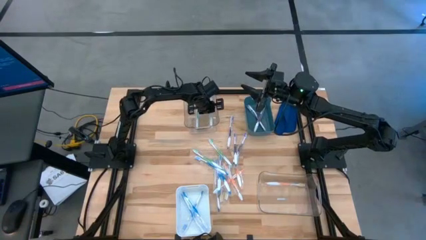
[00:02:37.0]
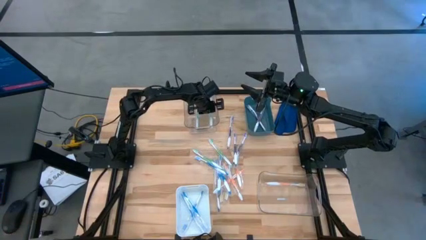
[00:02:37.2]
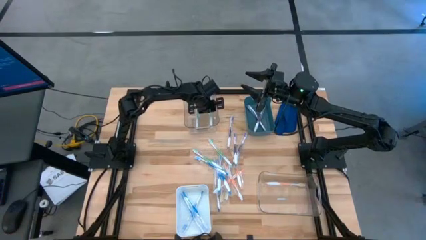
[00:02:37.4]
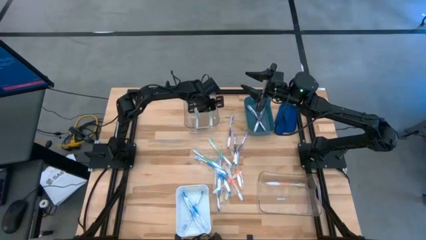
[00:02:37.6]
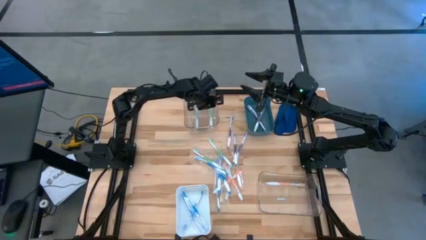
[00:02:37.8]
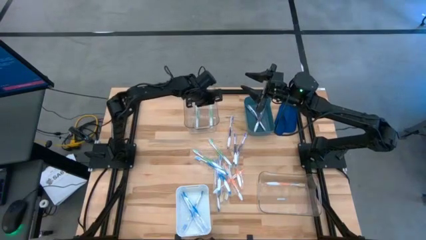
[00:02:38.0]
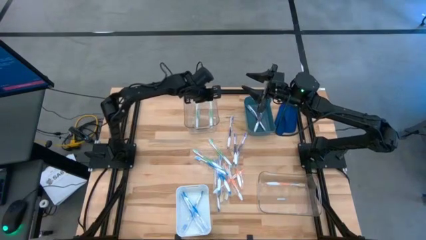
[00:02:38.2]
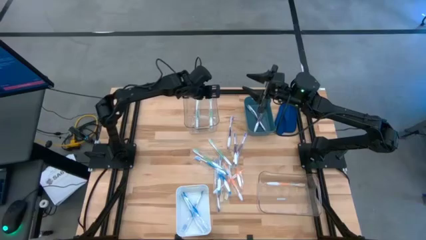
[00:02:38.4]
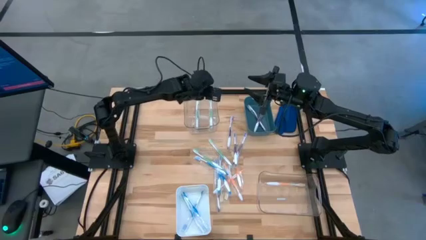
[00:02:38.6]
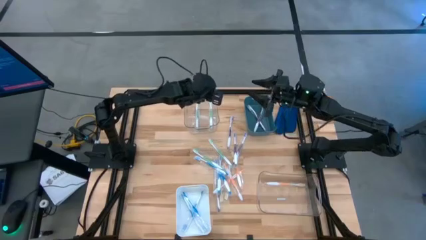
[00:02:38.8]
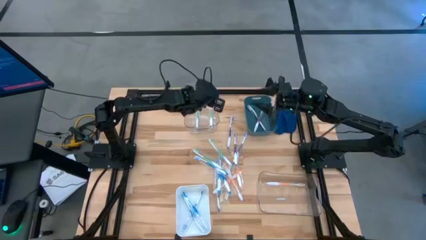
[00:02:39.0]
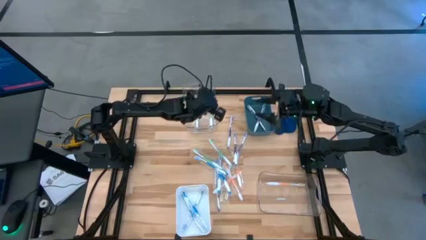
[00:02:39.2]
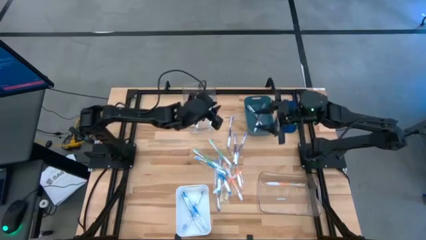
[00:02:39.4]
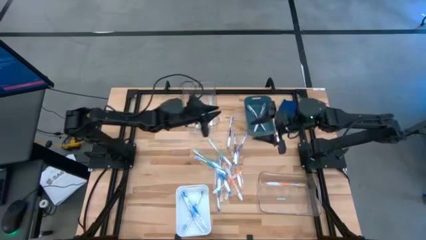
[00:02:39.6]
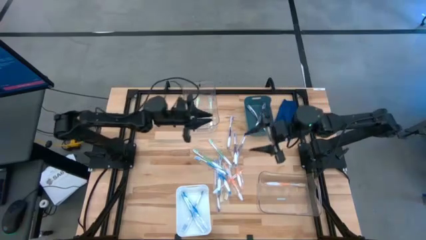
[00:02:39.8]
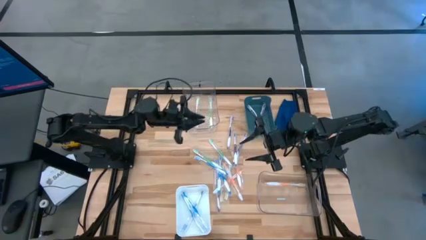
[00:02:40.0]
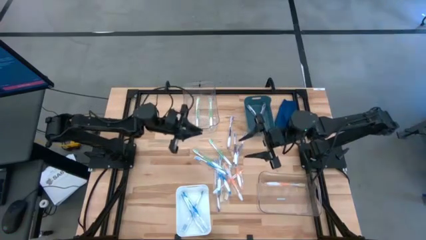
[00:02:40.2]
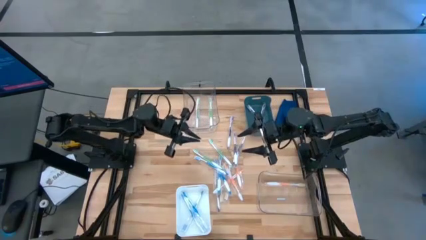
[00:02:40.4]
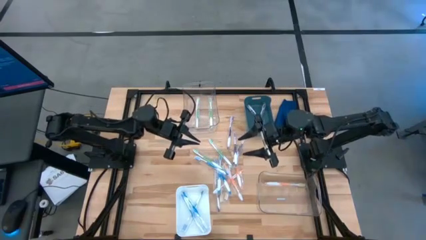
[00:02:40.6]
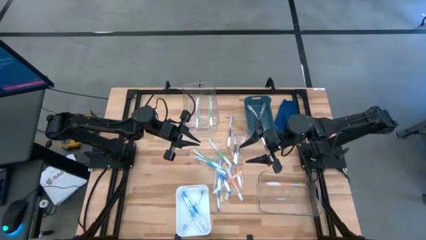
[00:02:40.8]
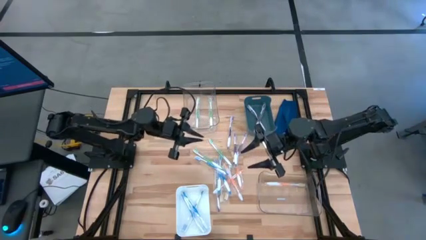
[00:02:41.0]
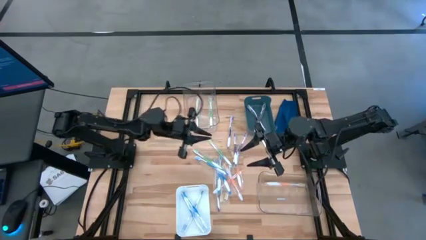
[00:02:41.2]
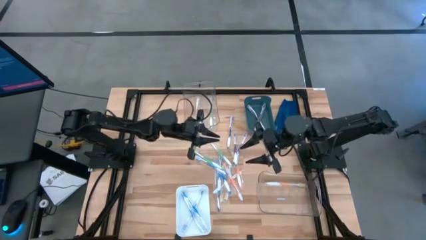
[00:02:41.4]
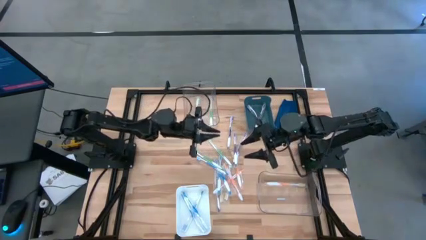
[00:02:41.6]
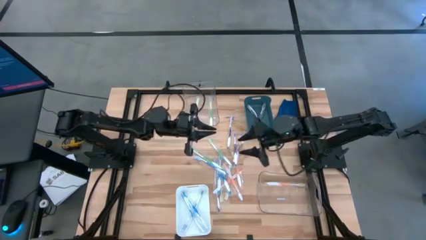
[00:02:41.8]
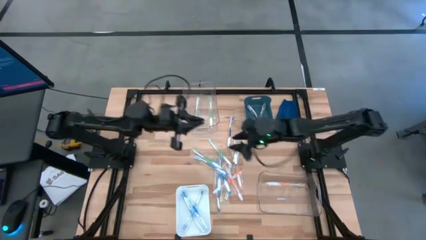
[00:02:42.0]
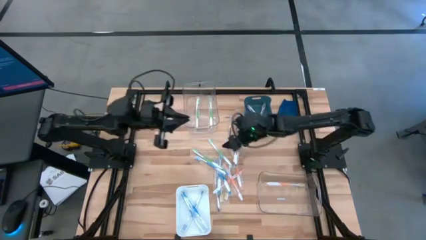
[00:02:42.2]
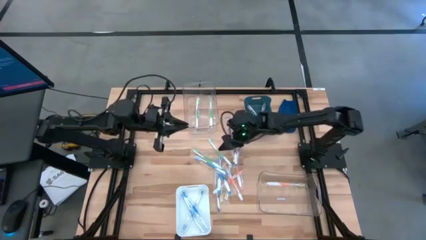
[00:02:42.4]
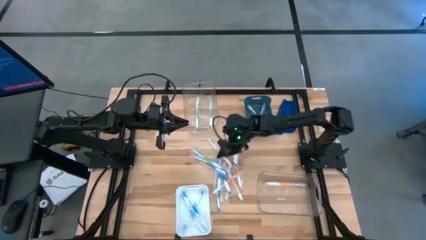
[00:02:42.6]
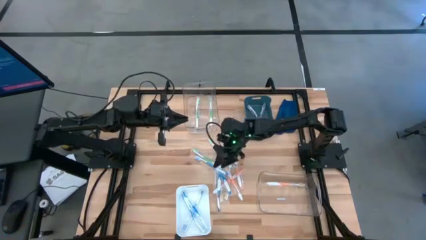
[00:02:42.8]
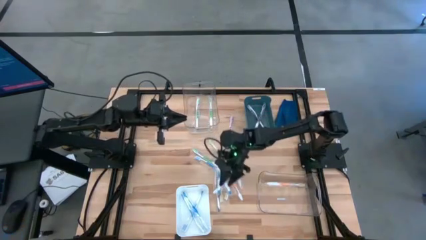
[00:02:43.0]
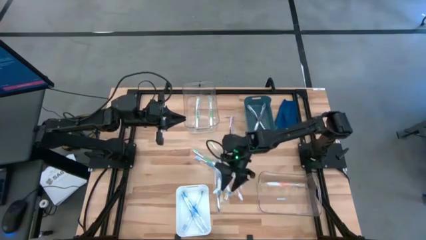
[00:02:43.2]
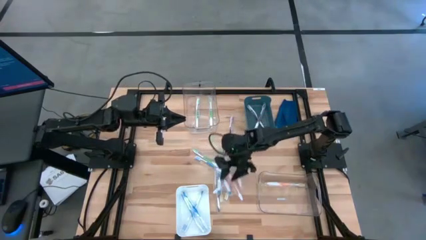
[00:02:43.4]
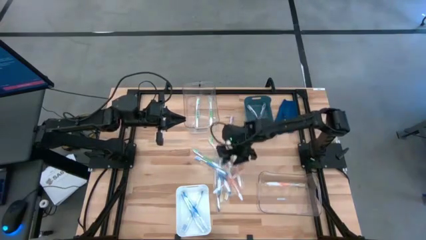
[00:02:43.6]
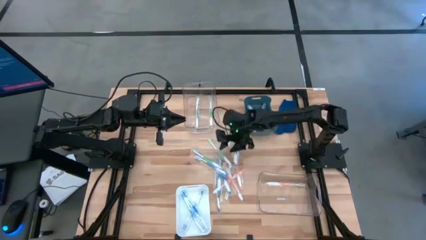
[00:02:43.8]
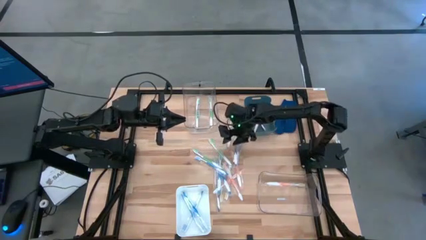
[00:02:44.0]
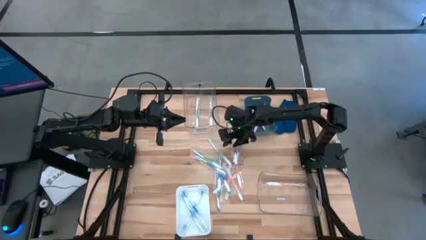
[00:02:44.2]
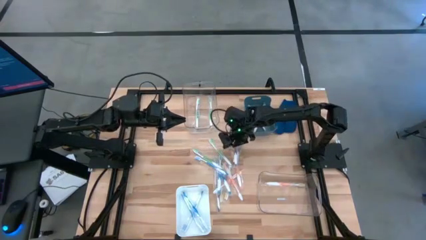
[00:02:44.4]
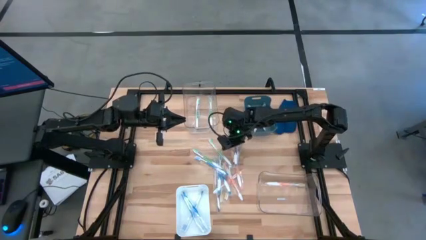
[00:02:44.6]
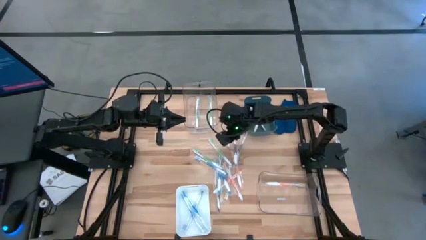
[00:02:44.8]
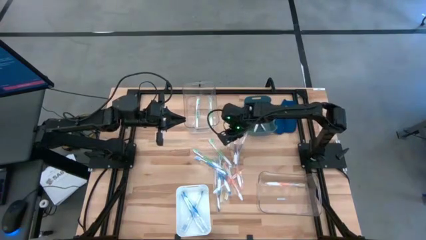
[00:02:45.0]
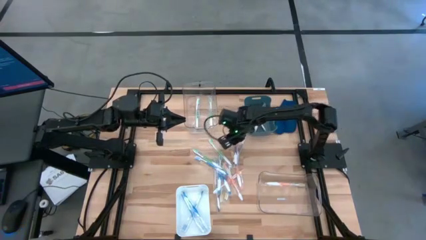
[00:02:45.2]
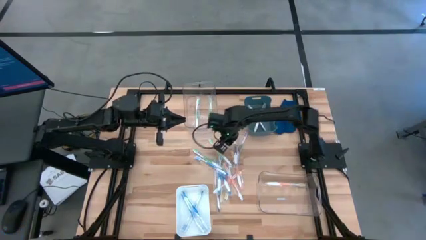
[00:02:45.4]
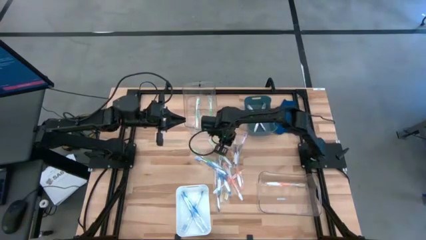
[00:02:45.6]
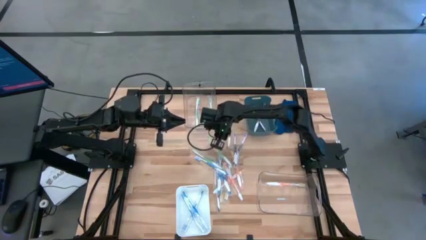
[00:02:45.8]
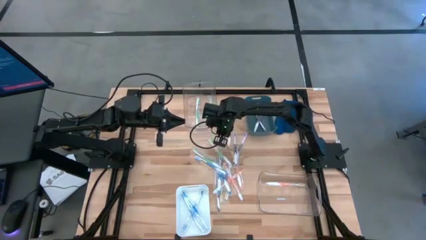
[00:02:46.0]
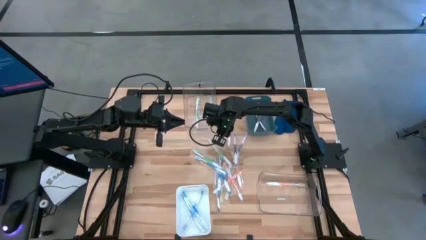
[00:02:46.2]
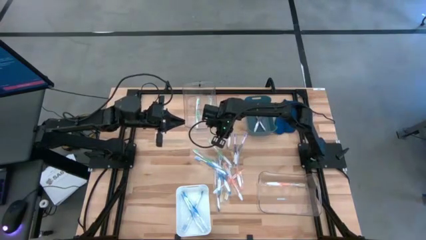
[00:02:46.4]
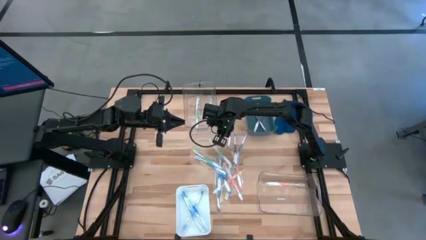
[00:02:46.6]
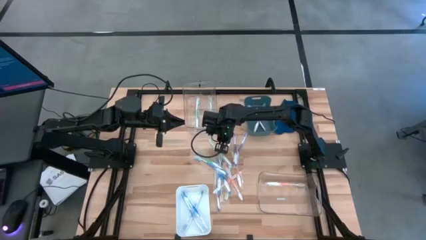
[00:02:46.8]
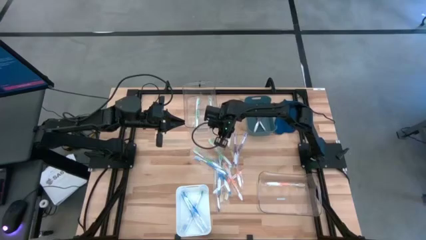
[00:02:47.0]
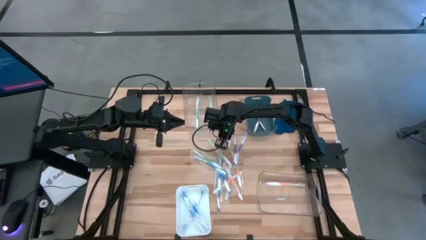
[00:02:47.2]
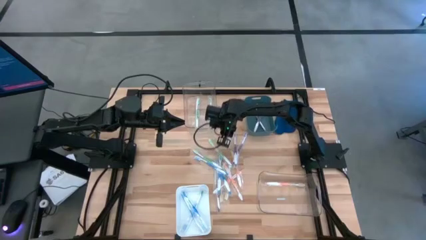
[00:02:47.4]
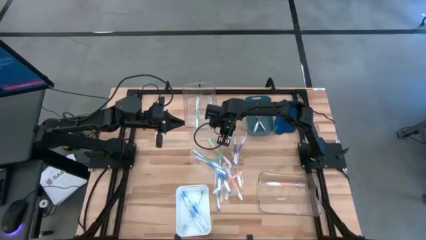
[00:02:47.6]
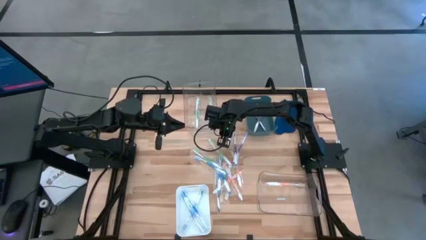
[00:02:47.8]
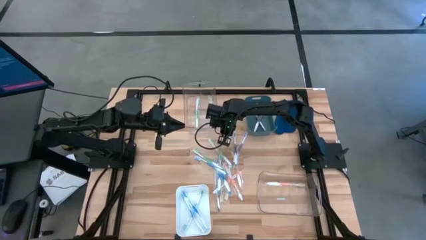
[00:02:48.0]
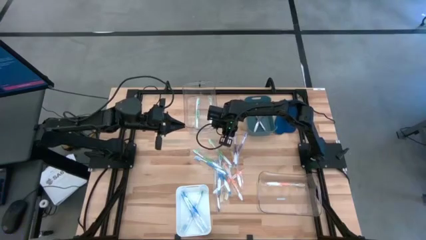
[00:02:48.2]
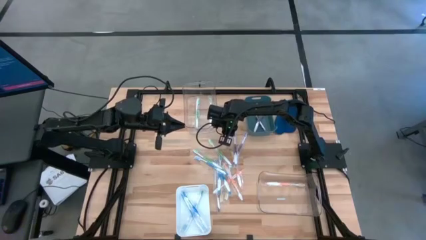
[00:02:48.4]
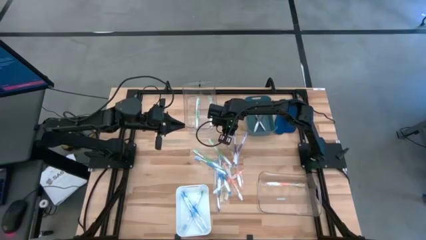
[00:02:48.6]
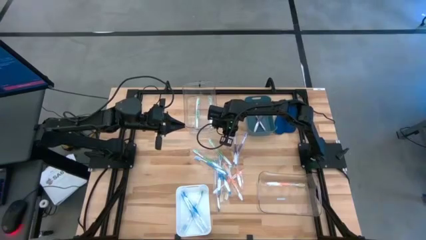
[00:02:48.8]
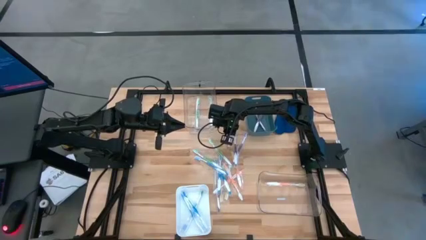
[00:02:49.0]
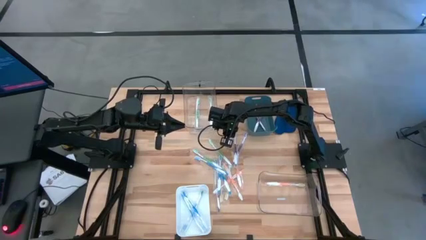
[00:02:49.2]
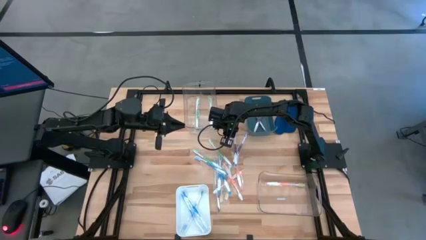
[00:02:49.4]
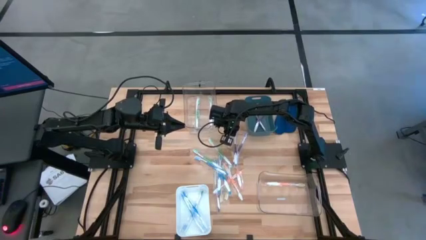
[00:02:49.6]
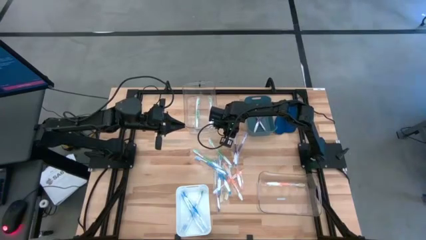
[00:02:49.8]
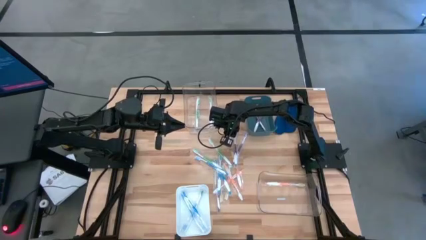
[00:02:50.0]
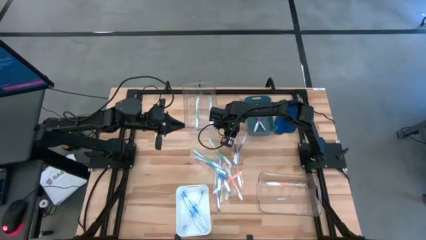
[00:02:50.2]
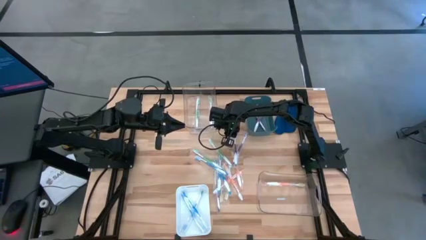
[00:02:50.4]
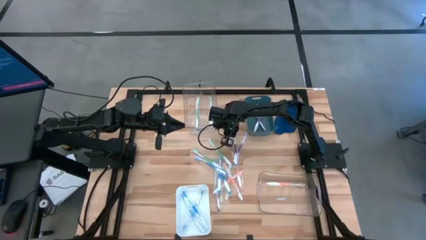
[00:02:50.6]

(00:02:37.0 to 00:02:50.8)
Task: Pick & Place Toothbrushes
Put the purple toothbrush into the green bin
